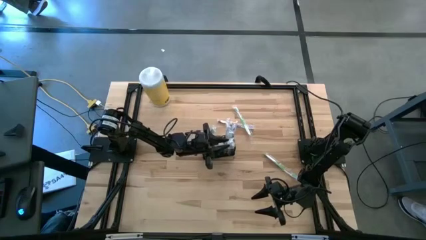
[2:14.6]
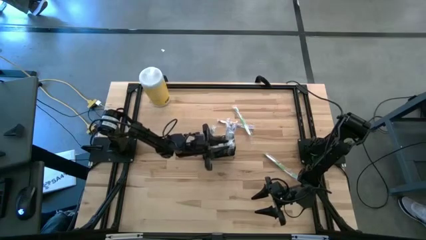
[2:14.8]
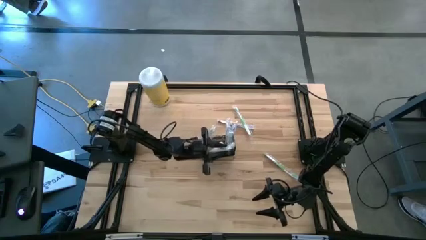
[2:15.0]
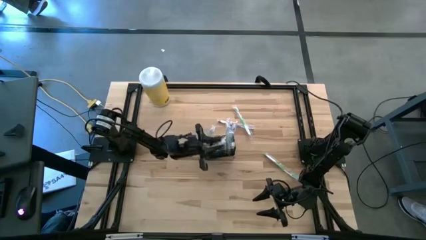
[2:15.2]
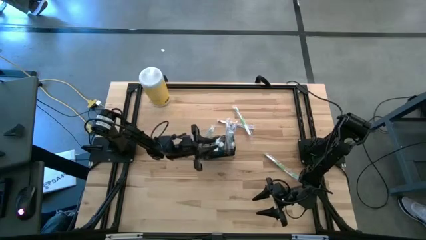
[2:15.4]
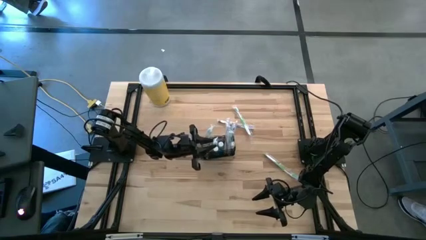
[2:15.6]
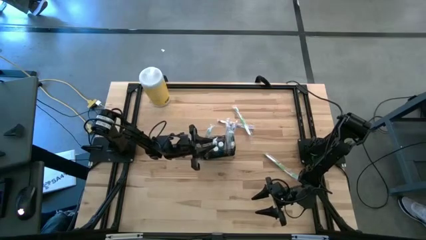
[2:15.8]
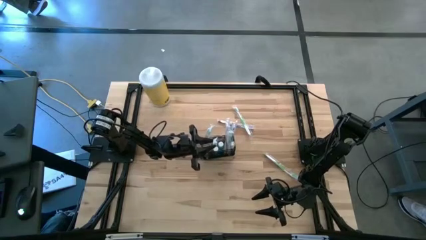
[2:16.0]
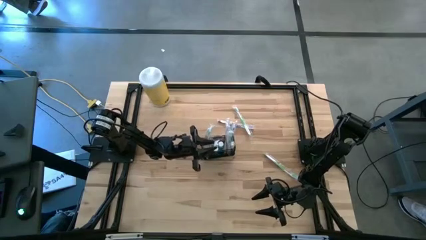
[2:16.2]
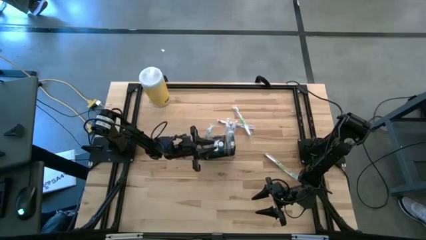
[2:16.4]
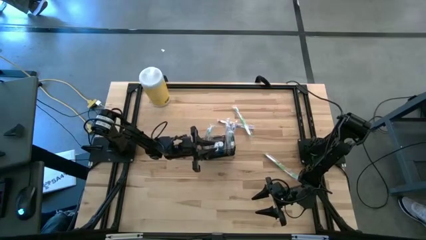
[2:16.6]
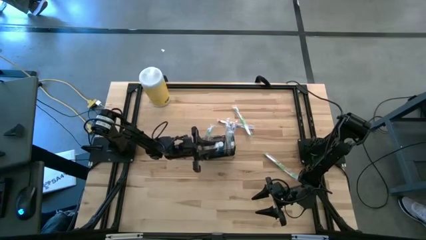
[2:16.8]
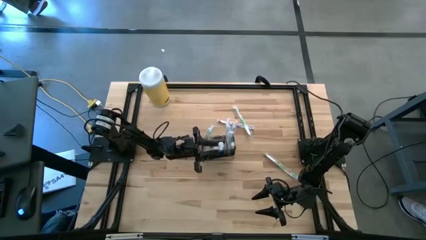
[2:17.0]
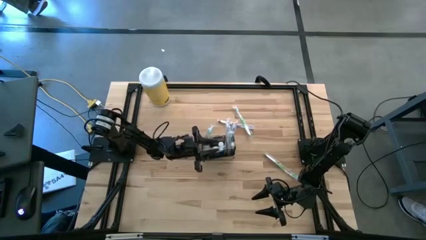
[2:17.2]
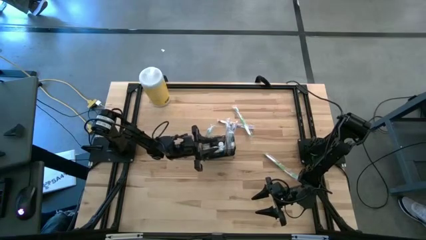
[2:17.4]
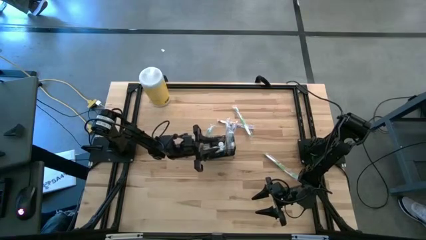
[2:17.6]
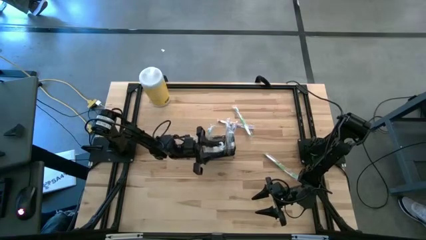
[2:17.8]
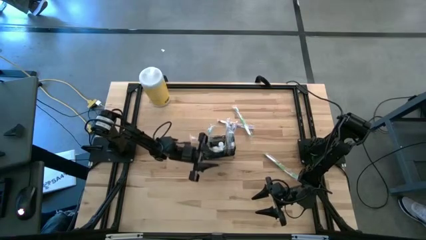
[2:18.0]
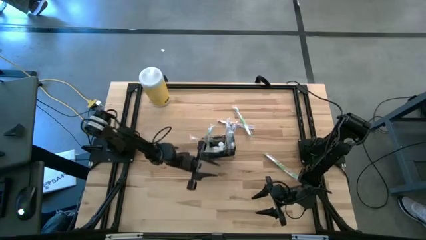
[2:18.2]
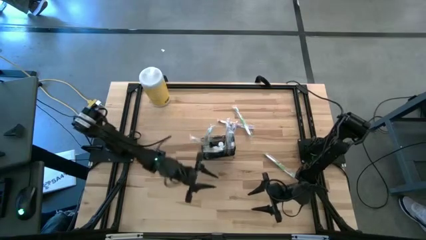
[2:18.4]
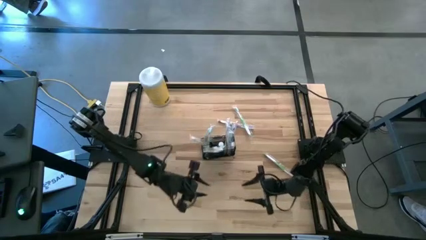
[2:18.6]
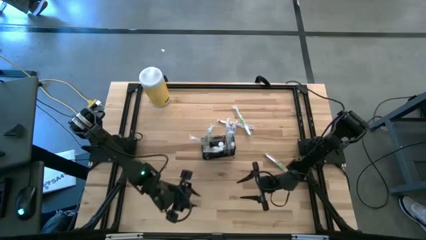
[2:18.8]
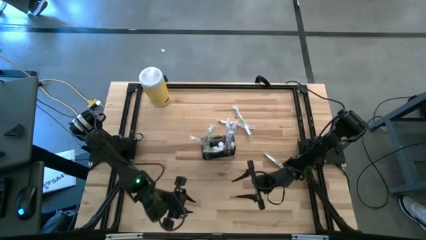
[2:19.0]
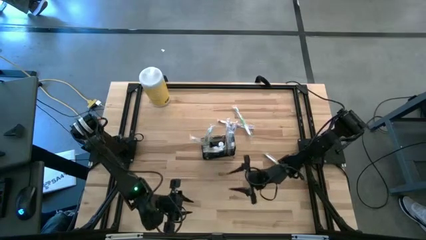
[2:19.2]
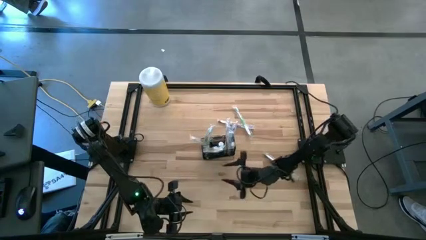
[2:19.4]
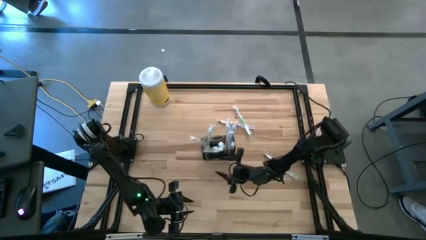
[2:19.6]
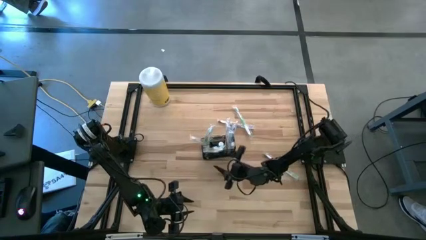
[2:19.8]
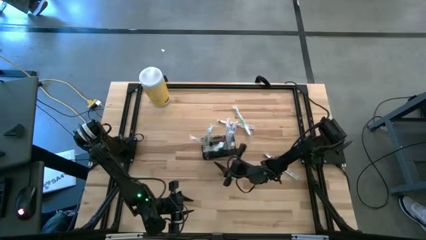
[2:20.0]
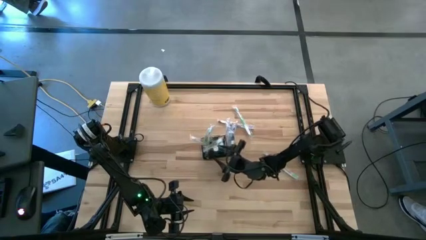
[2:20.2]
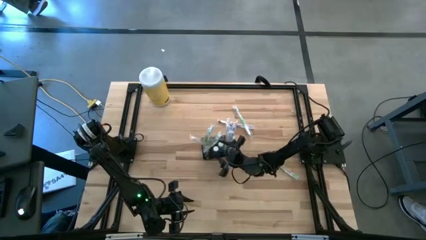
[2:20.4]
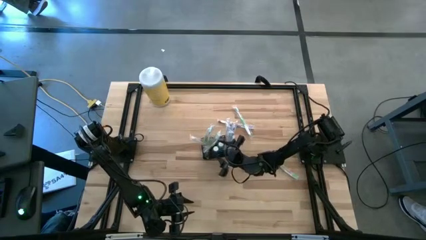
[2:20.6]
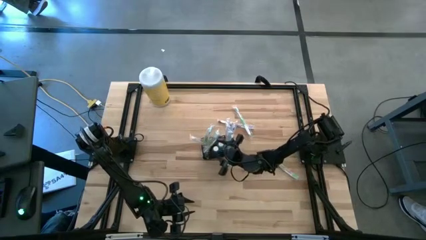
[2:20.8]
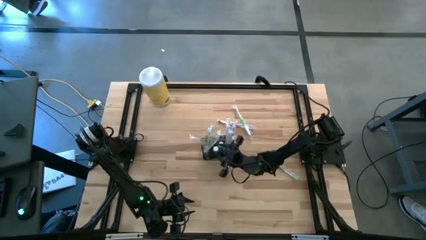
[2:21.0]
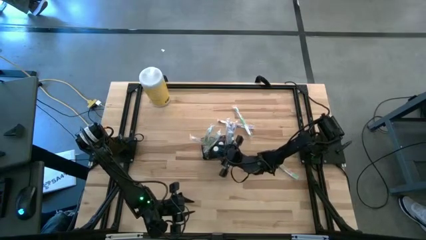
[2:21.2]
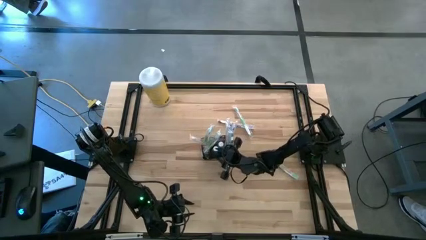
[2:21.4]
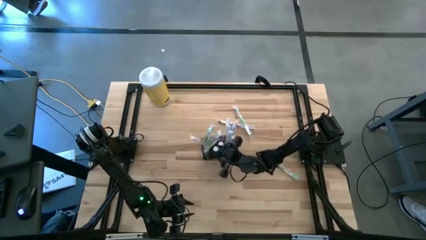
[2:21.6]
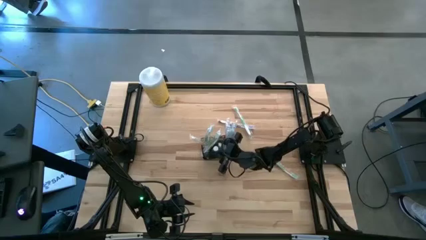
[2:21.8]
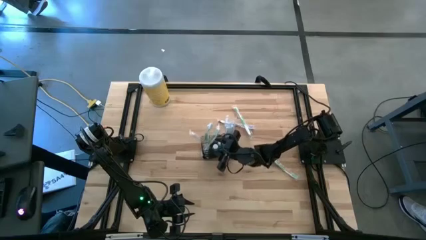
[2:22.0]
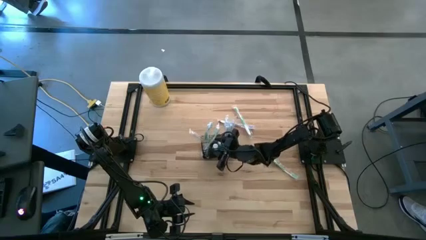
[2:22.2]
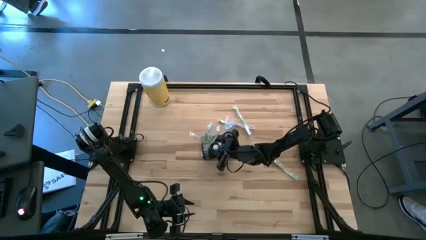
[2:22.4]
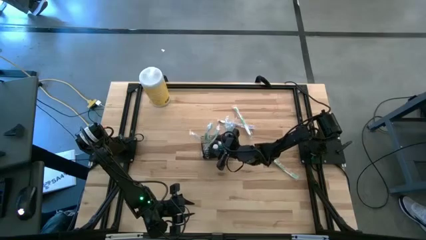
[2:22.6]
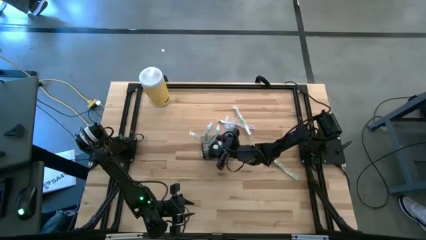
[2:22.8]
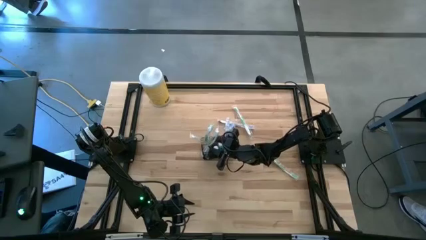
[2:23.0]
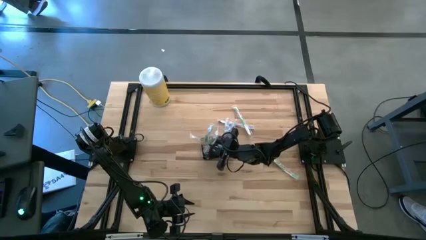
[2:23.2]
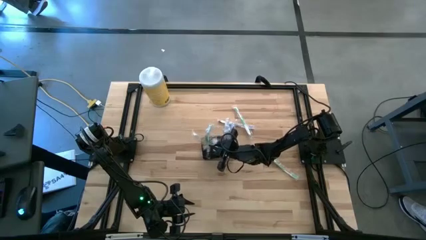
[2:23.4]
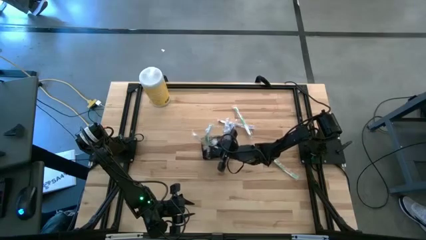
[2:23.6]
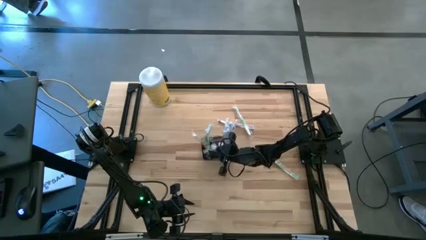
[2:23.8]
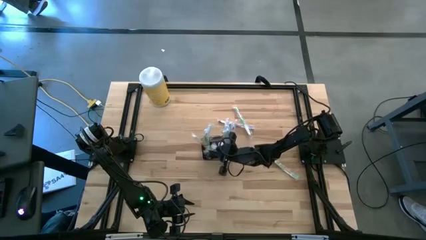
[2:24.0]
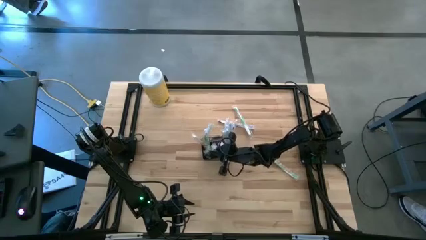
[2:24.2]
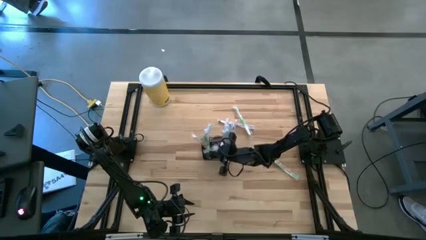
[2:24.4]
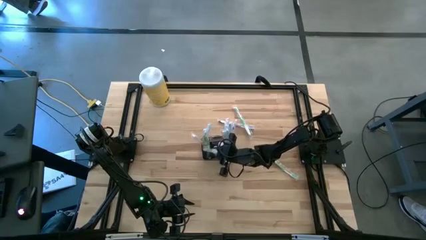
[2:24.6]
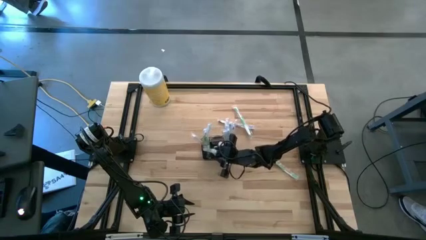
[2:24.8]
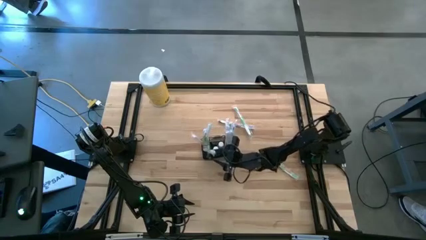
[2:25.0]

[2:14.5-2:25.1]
Task: Pick & Place toothbrushing station
Put the green toothbrush into the wire organizer

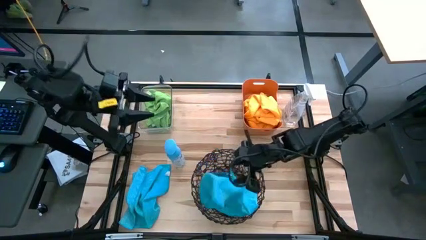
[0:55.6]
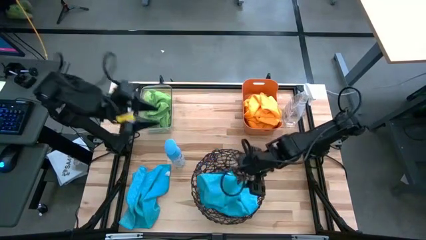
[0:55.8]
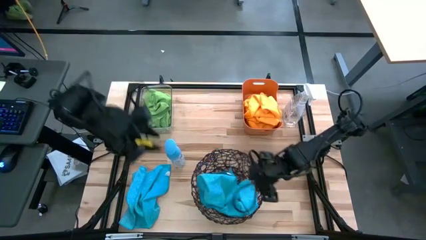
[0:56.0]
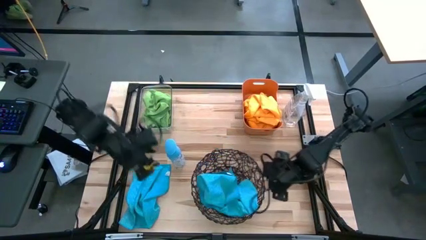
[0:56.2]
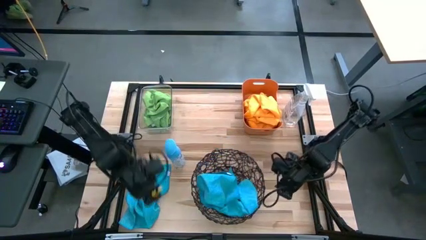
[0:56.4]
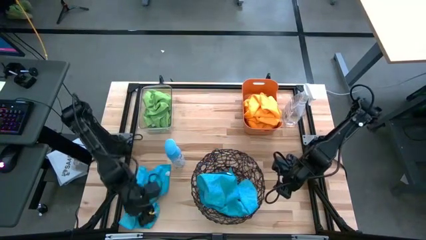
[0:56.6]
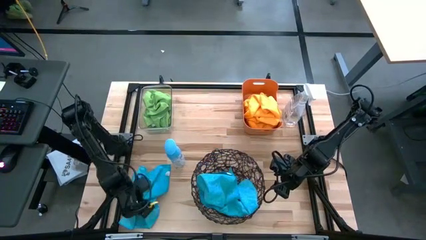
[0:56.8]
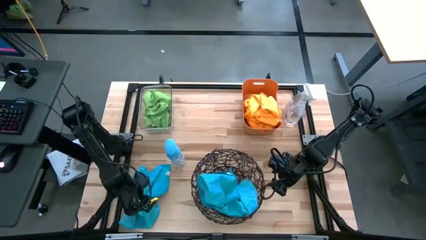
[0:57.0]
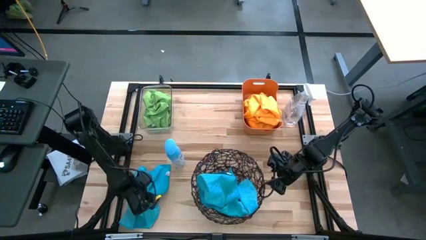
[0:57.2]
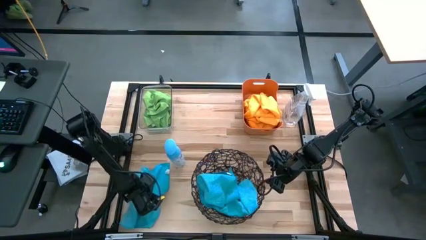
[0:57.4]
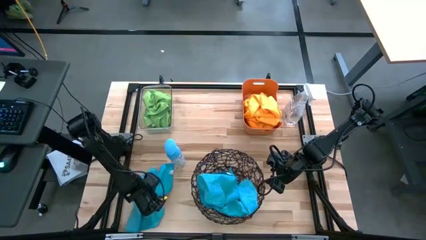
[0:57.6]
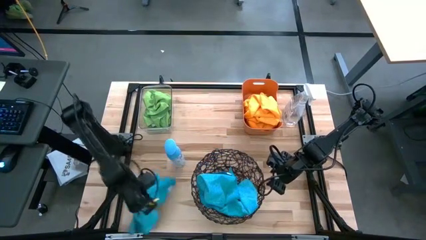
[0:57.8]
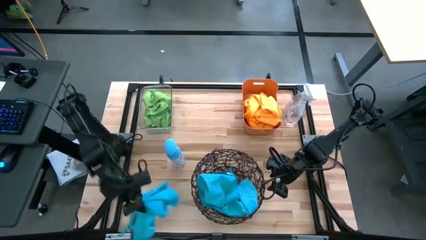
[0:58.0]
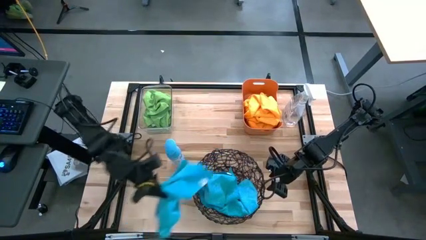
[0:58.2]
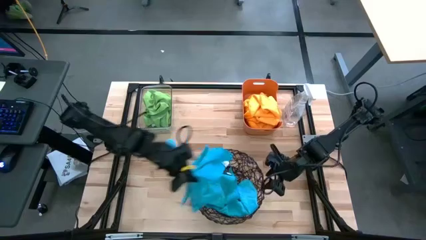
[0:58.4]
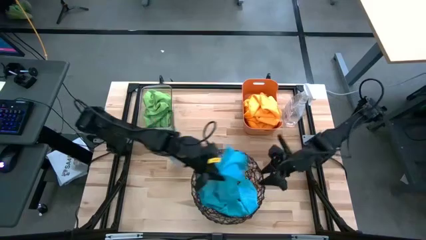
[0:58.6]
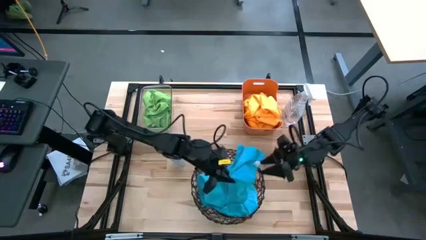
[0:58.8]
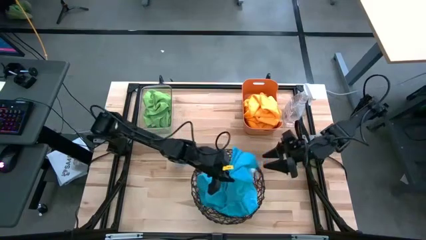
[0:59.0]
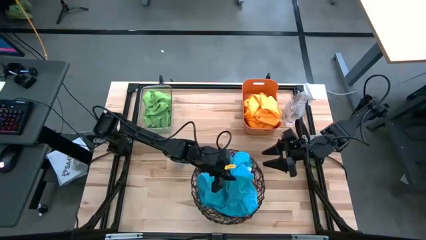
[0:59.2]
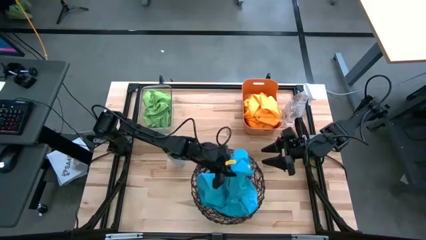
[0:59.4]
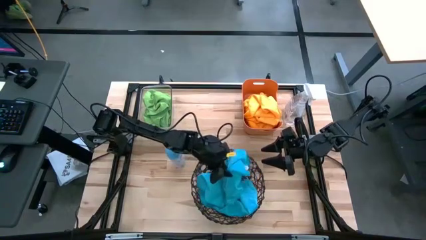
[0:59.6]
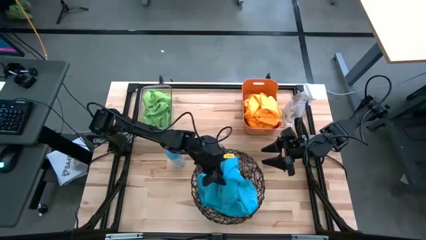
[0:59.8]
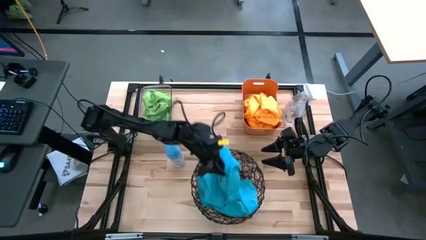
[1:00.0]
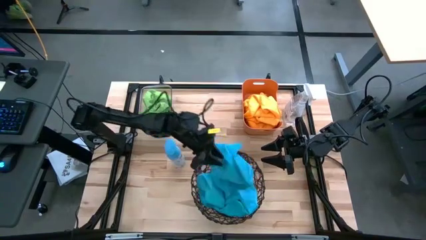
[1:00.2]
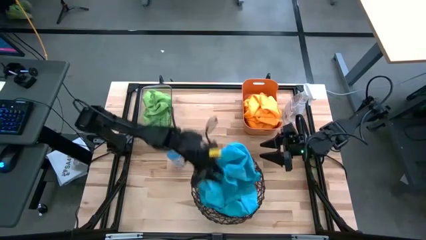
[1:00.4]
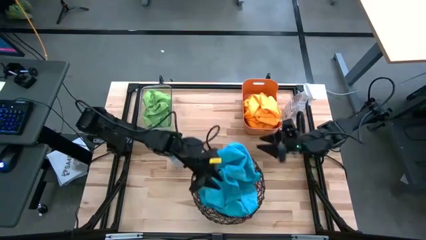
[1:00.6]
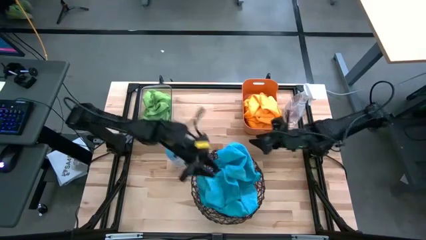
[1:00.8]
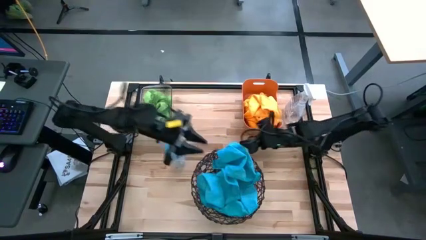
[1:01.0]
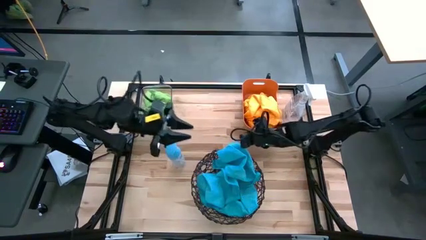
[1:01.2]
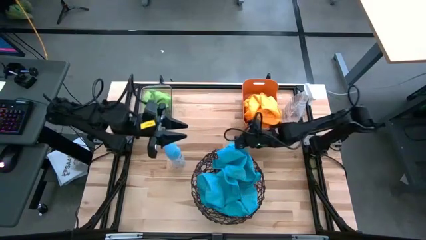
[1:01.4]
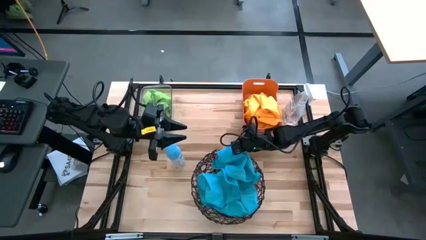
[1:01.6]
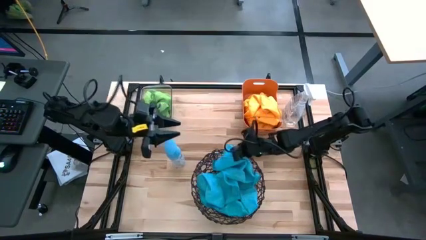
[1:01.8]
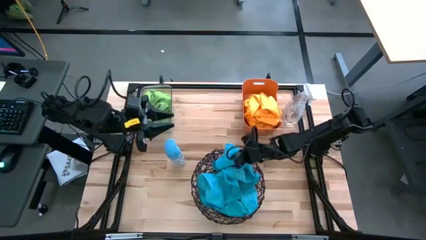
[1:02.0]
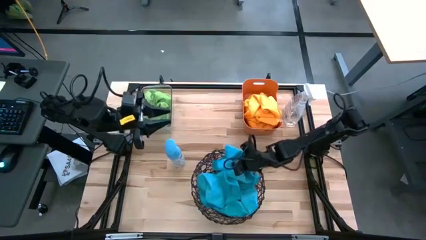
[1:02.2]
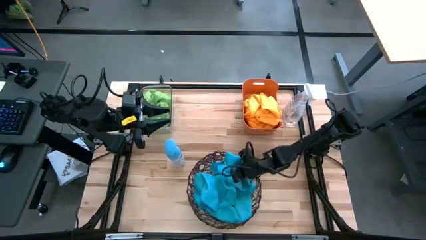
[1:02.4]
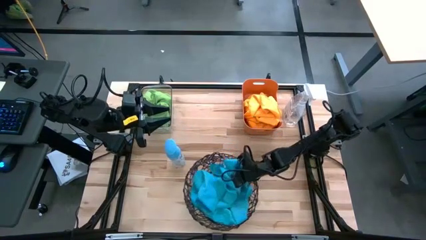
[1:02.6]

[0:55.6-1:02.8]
Task: Sort microfiber towel by color & place in baskets
Put the blue microfiber cloth into the black wire basket
